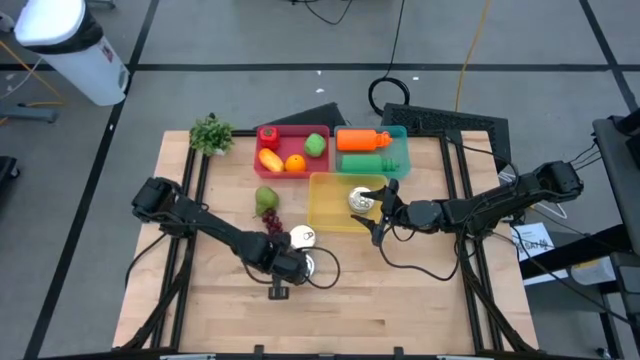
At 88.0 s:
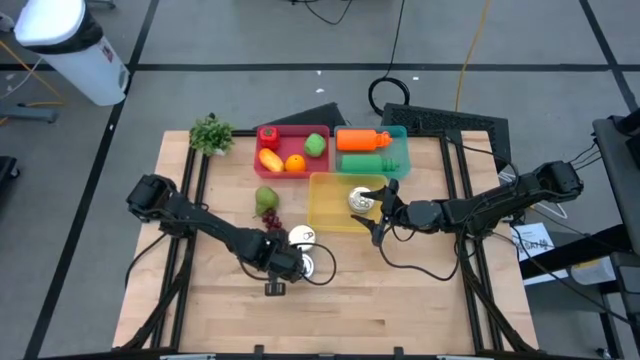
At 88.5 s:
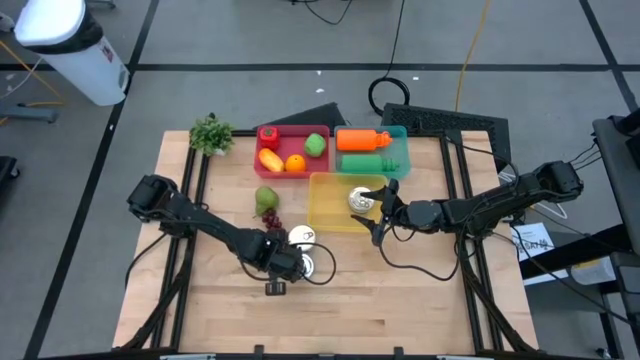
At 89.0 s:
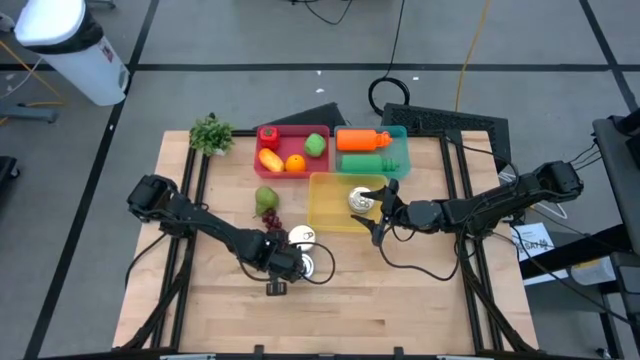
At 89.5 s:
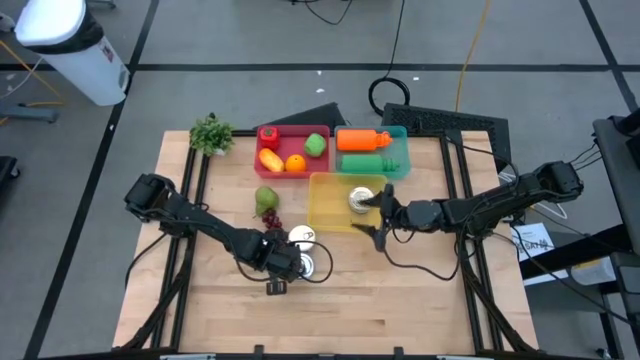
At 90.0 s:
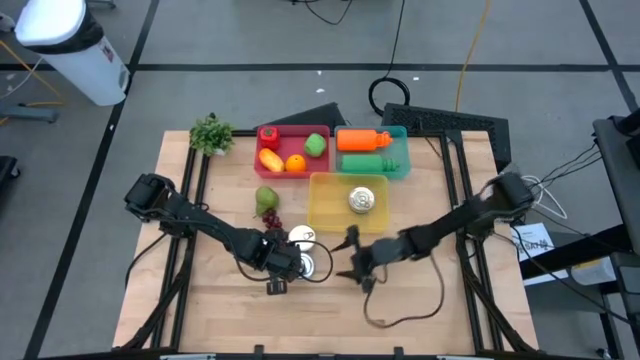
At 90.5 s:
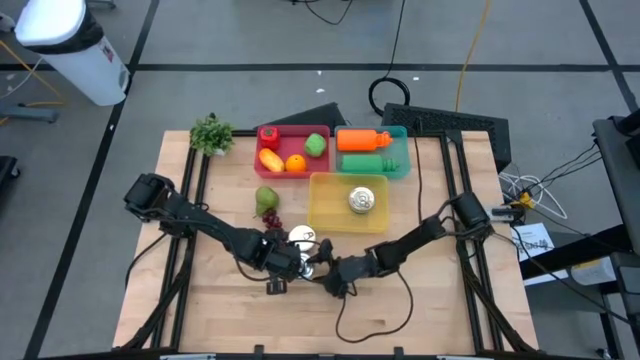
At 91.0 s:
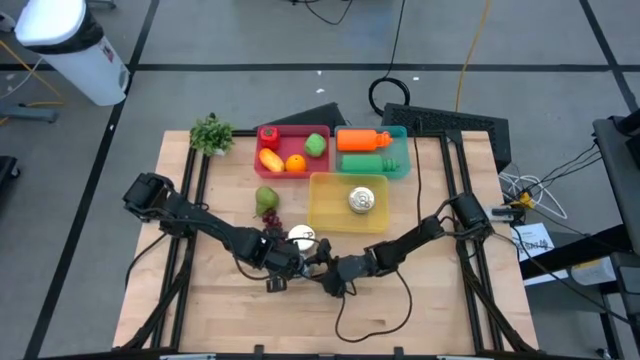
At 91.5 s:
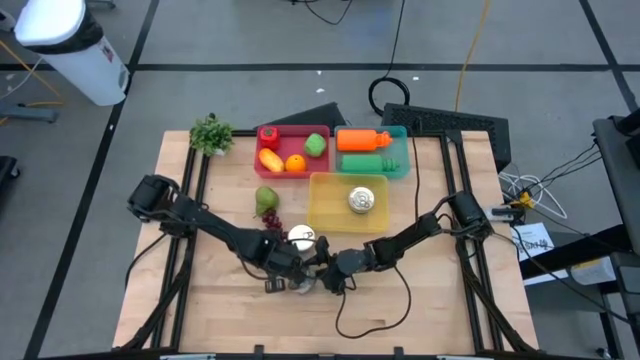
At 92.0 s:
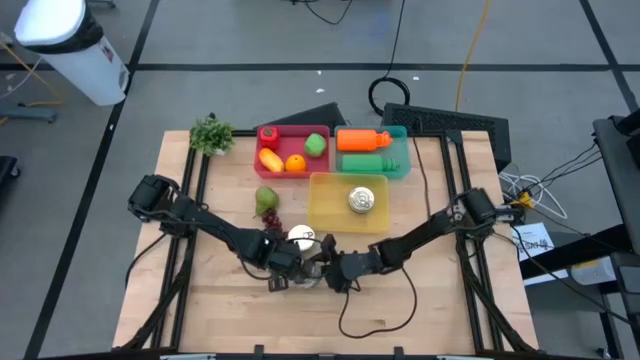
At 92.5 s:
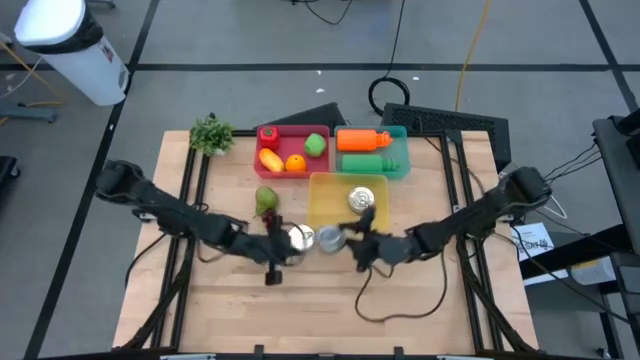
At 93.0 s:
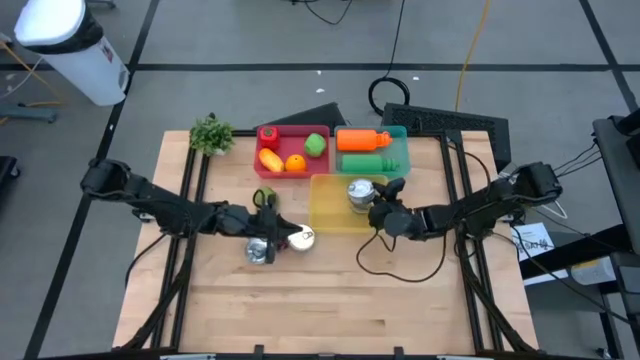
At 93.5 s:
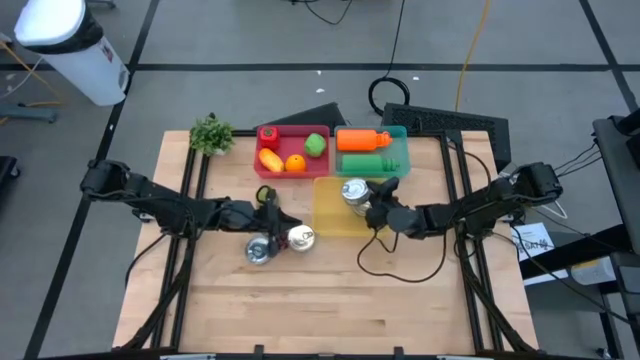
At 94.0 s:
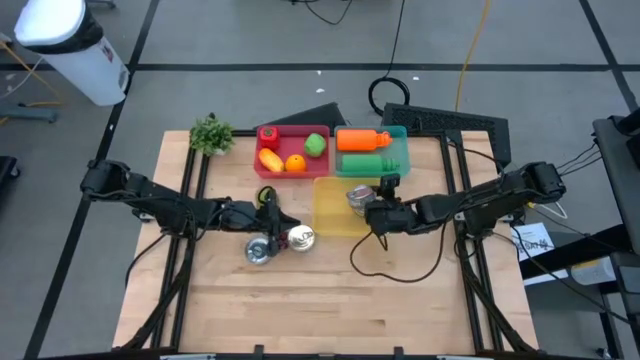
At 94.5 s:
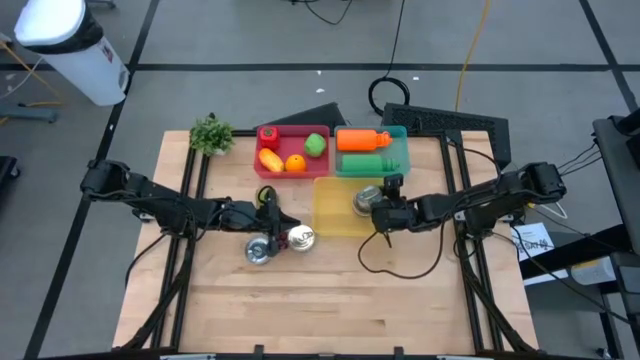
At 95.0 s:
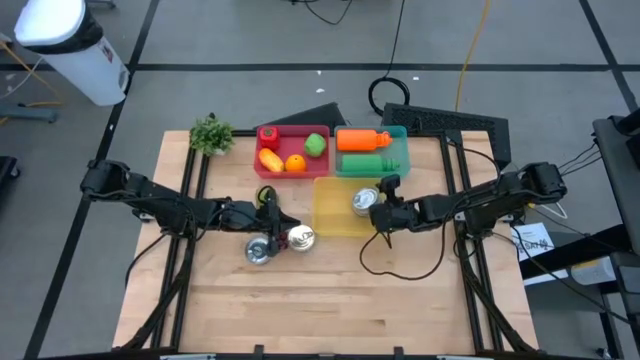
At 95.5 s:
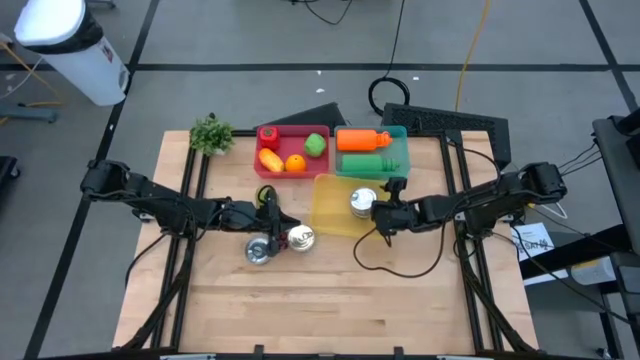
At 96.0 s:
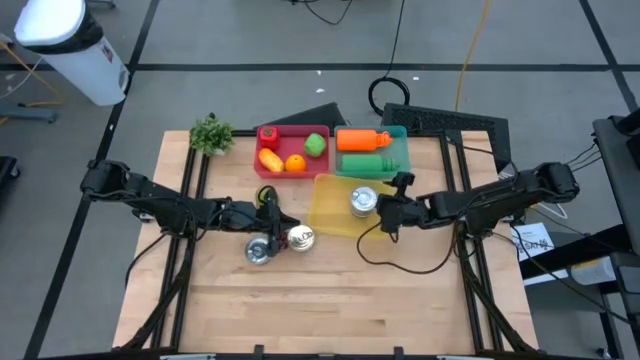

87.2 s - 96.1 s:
Task: Pick & Place Food Item
Put the right green tuna can into the yellow bin

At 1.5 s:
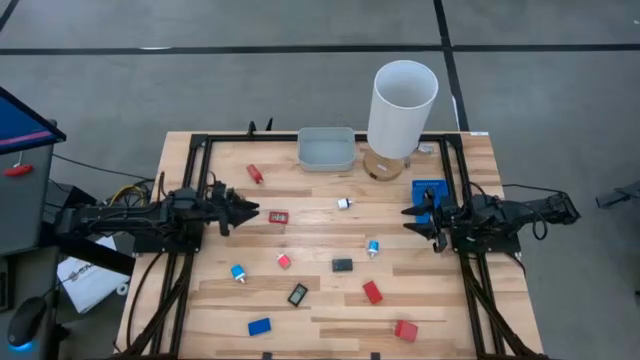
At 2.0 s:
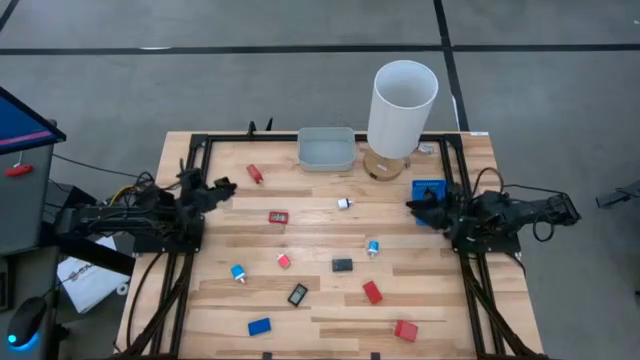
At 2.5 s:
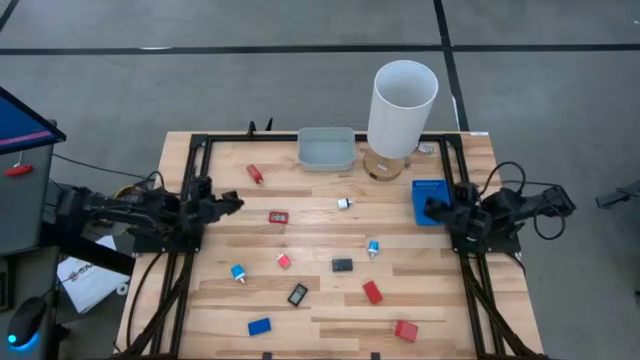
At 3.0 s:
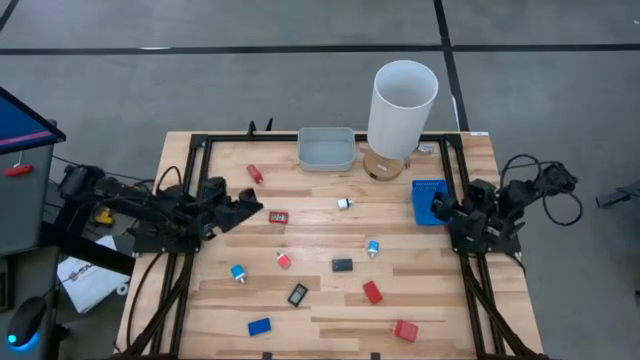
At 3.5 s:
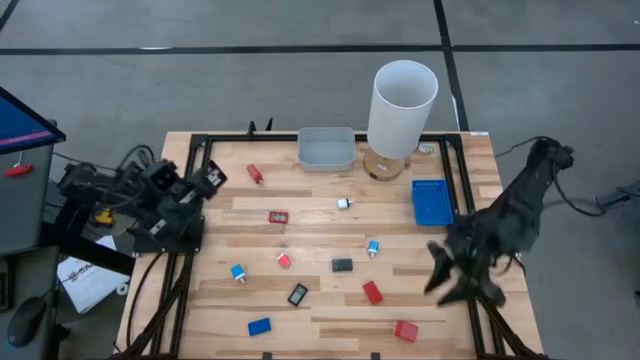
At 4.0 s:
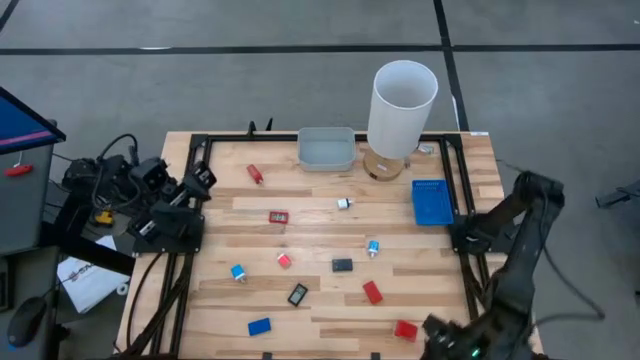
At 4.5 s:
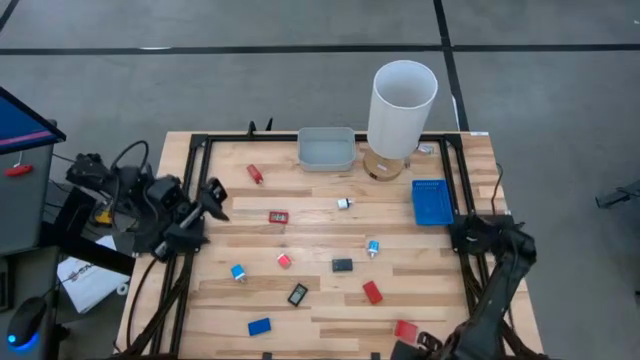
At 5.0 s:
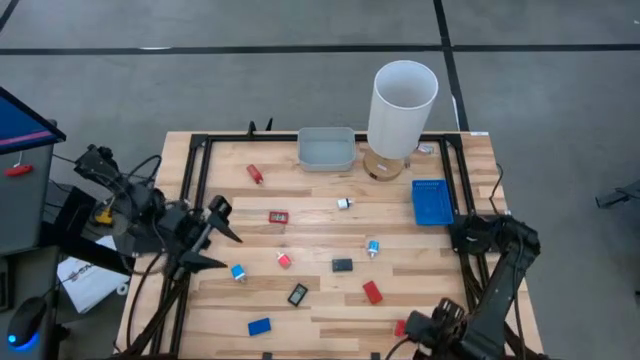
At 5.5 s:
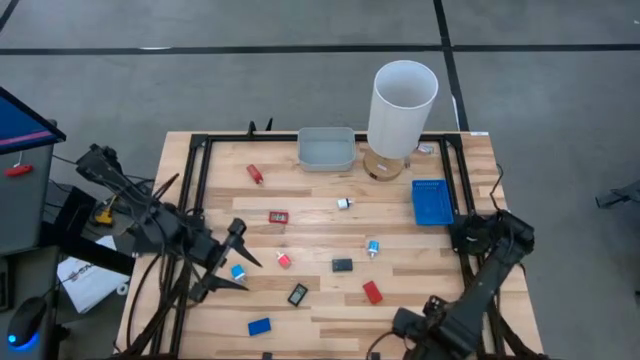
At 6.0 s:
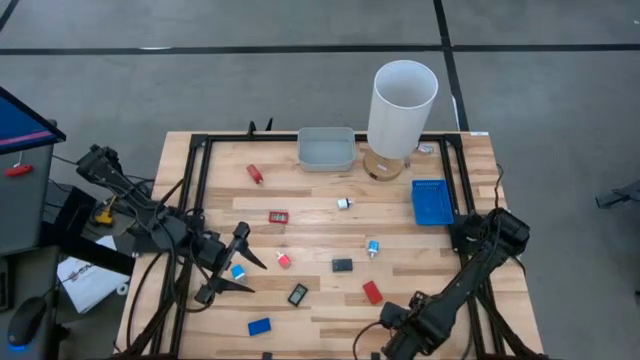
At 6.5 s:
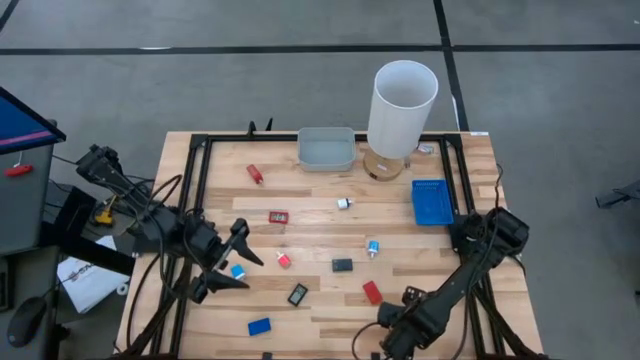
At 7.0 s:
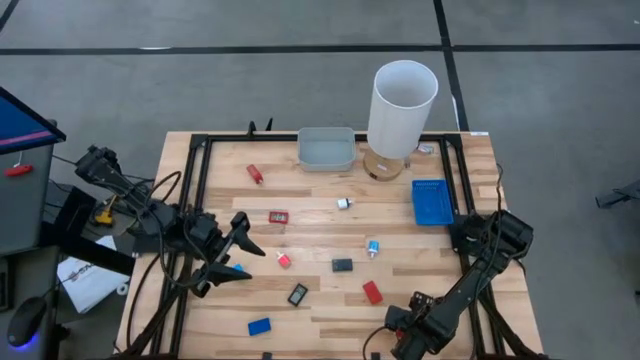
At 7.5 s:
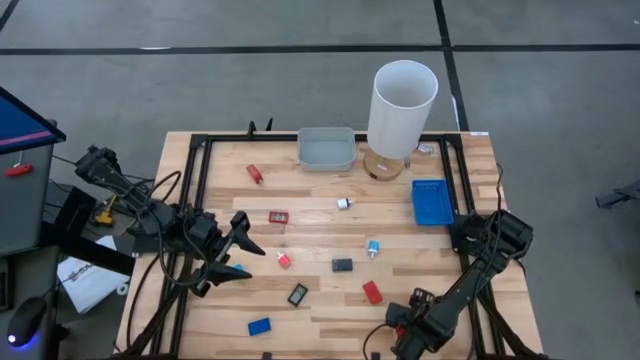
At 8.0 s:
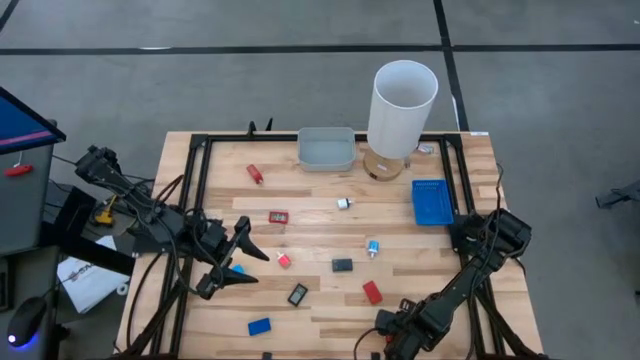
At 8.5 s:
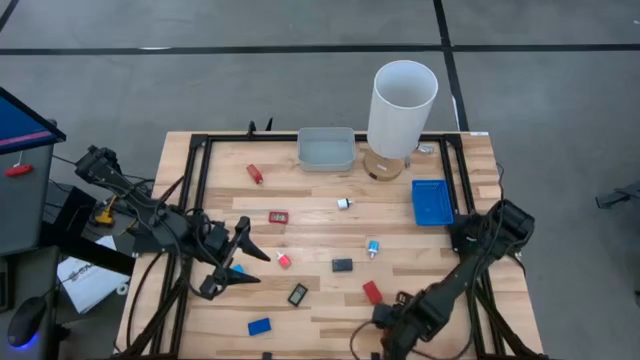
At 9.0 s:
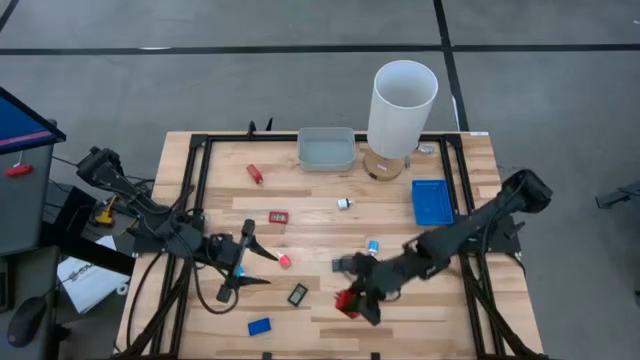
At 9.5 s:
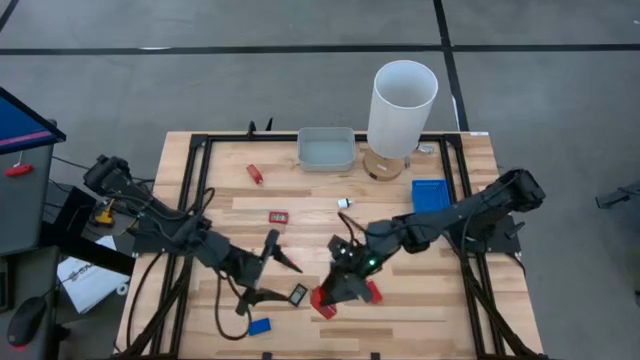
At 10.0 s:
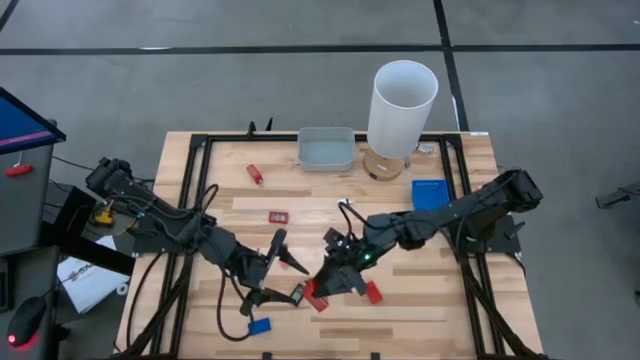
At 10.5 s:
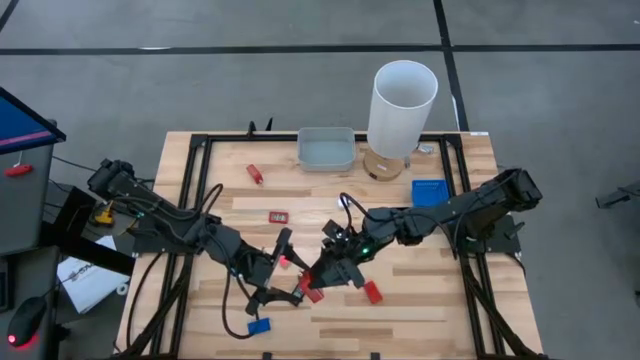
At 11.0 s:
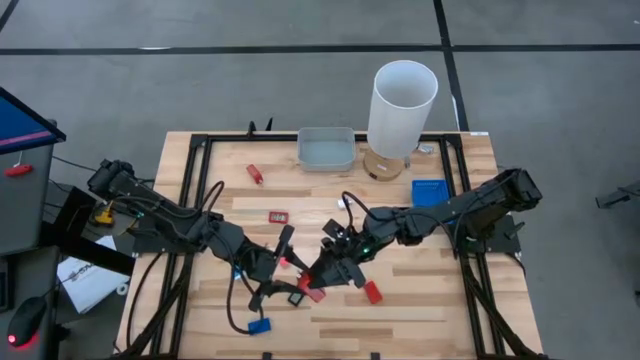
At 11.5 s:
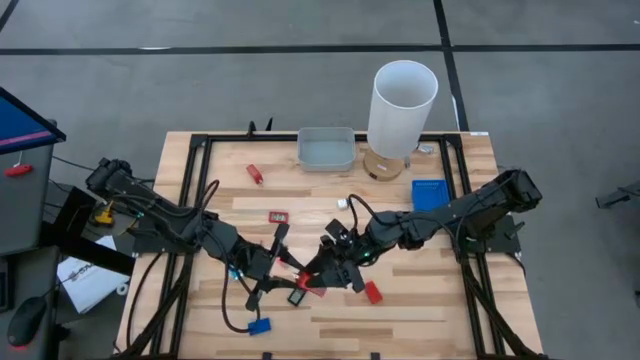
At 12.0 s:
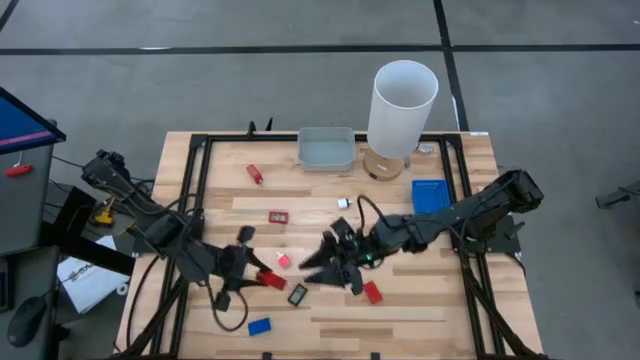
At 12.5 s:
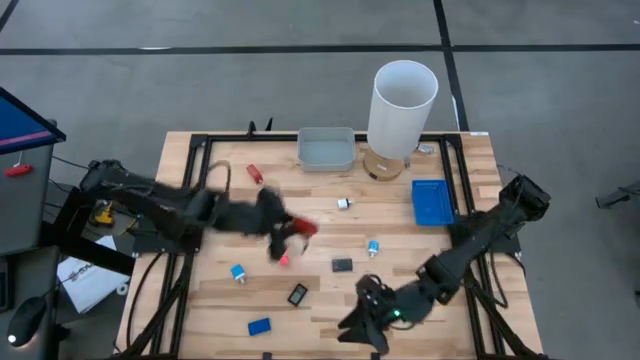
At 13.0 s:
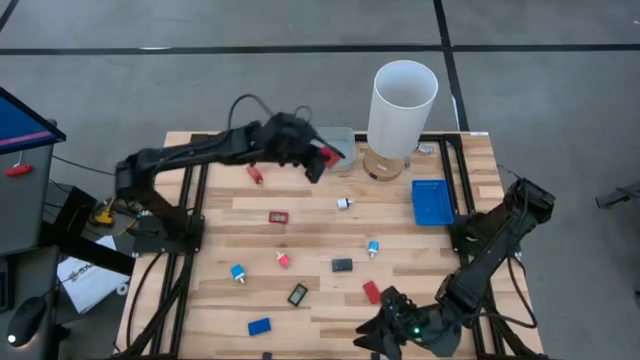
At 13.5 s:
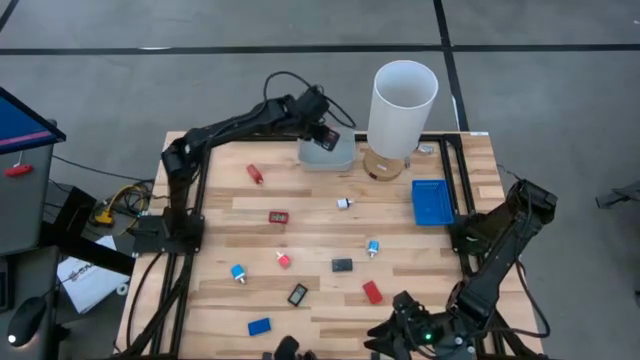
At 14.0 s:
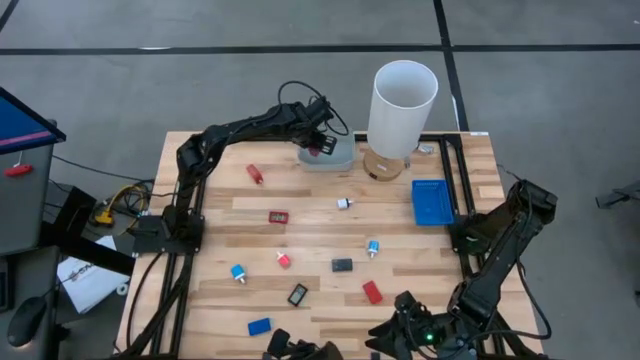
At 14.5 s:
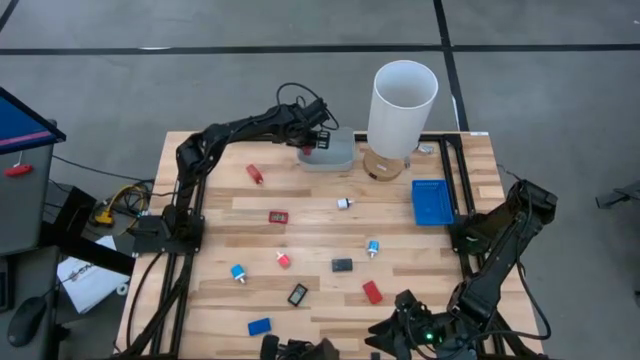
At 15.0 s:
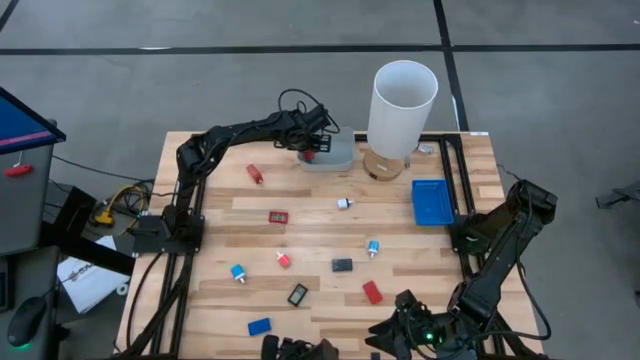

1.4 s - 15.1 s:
Task: Pick & Place Office items
Put the bottom red charger adapter into the gray bin
